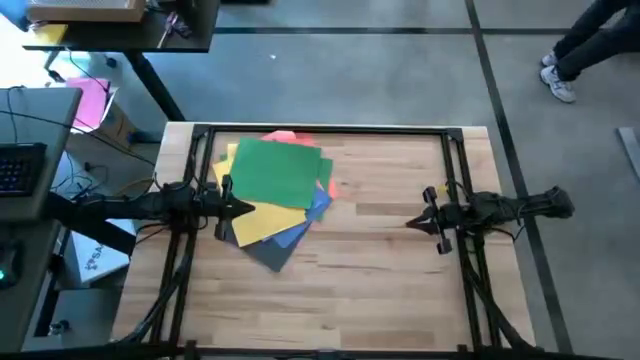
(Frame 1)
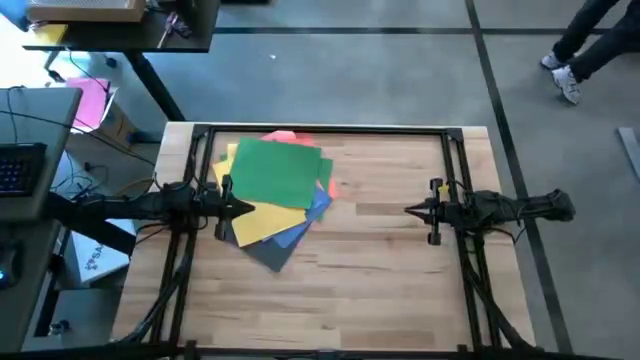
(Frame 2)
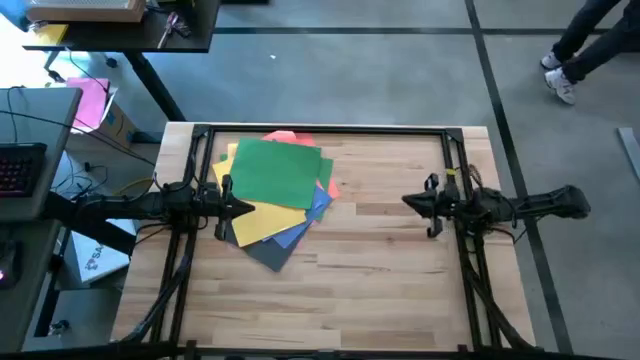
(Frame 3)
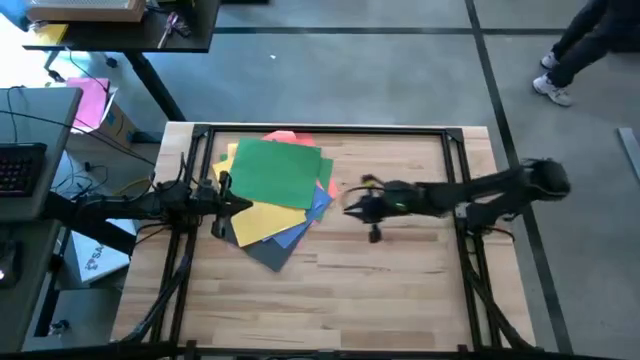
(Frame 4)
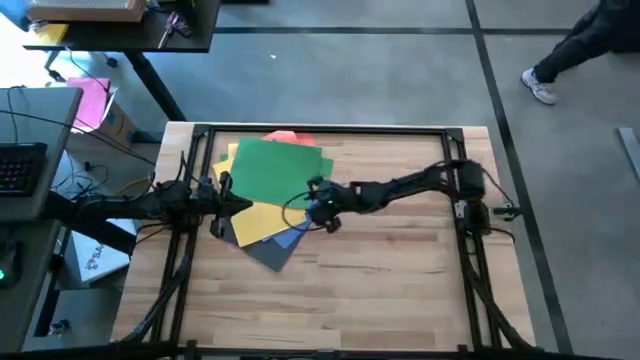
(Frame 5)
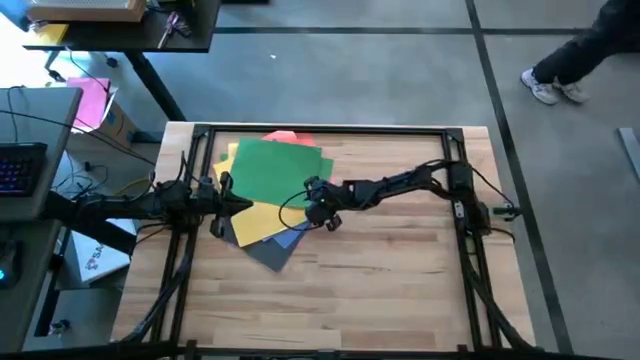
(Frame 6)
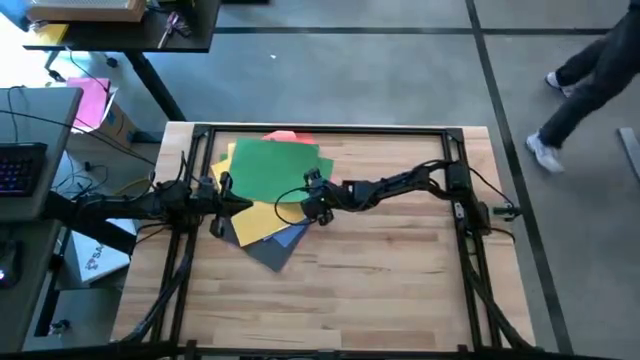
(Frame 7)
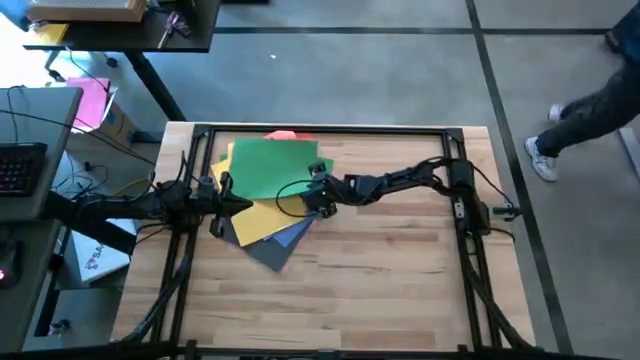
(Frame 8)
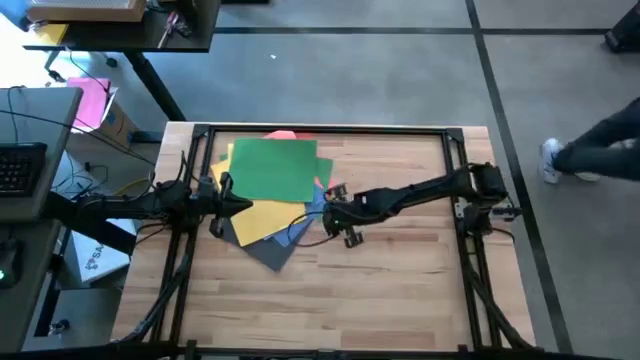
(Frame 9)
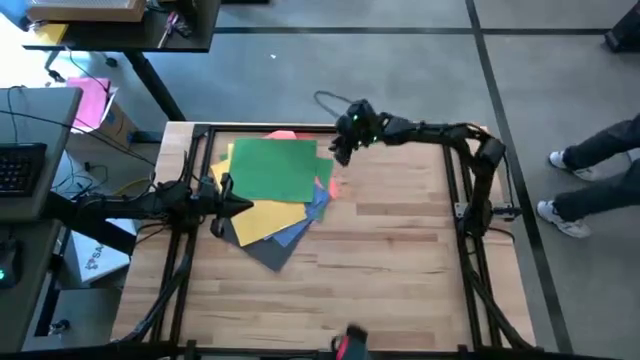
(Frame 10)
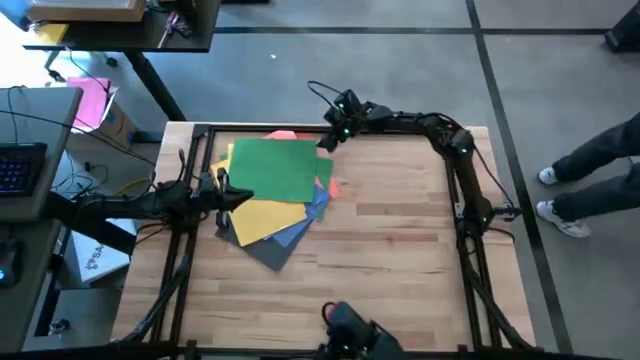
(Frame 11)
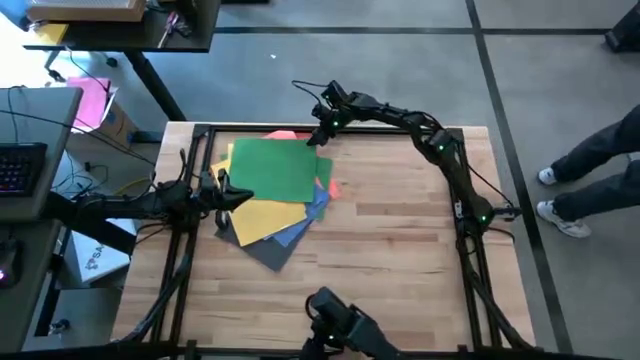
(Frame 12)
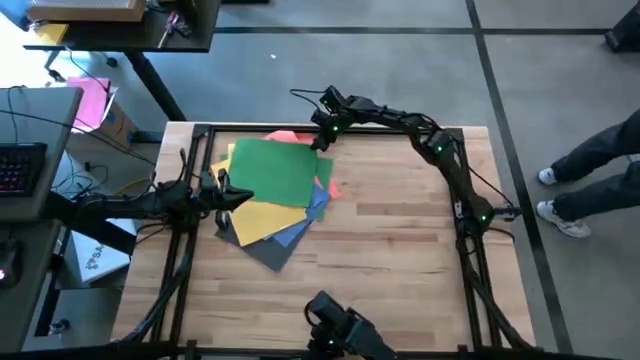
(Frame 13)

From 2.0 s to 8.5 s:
Task: Organize paper
Put the green paper to the bottom right

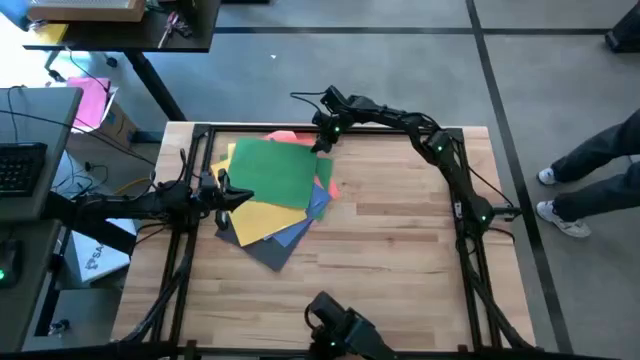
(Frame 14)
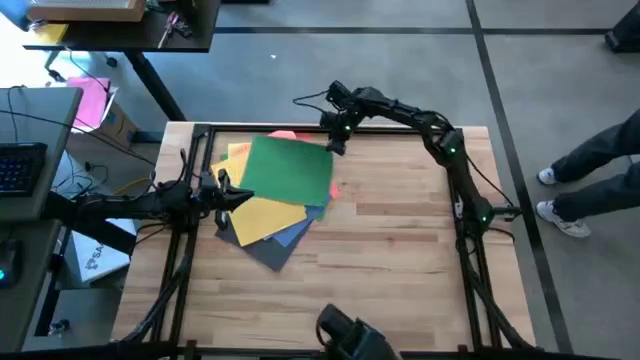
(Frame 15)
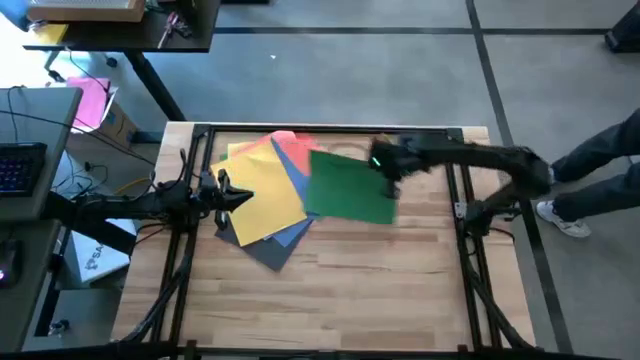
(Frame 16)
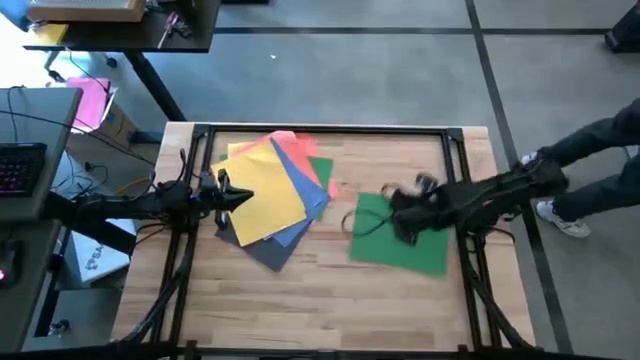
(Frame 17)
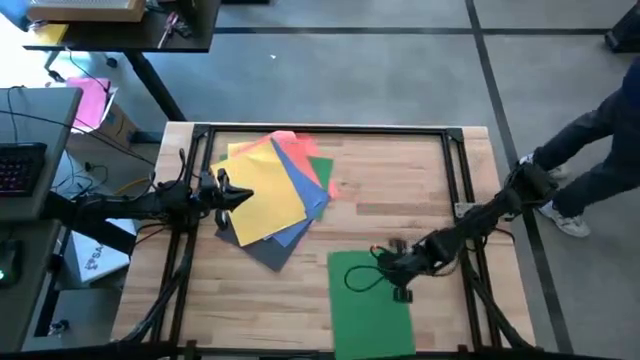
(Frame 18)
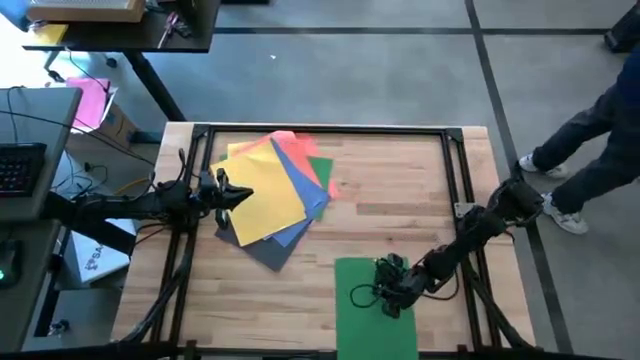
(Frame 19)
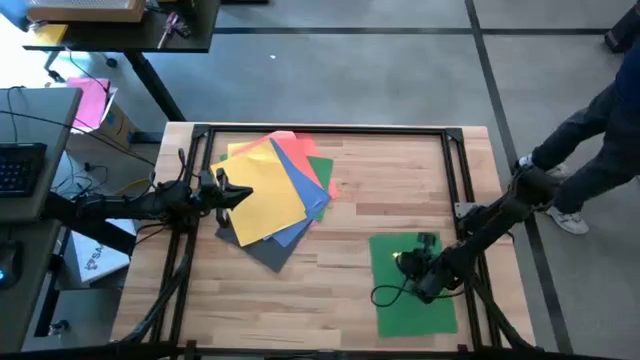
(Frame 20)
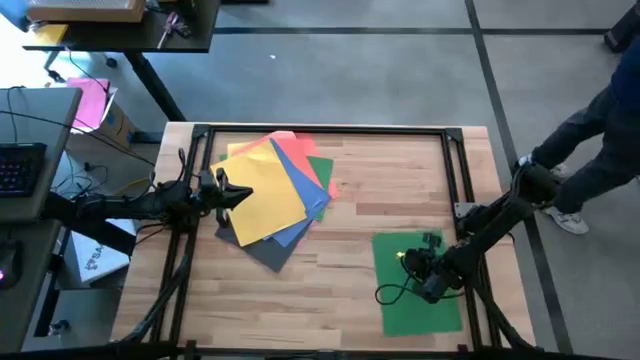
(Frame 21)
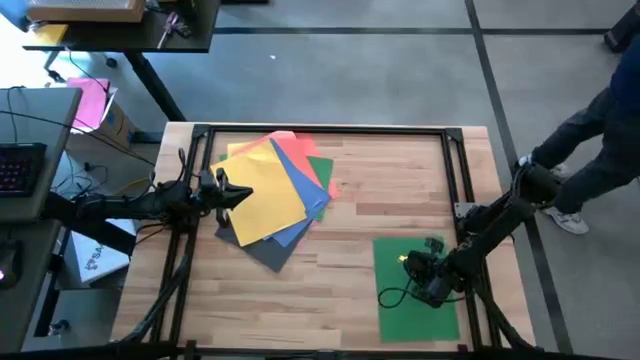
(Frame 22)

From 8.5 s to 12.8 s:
Put the green paper to the bottom right of the table

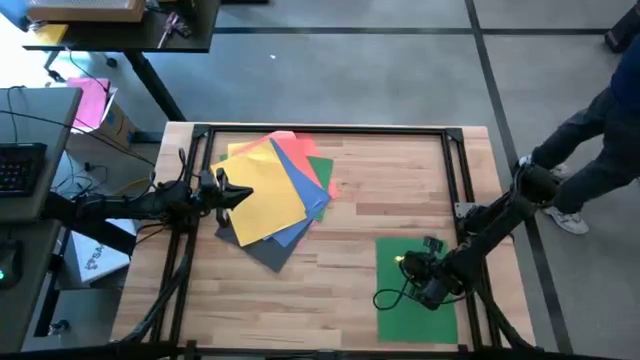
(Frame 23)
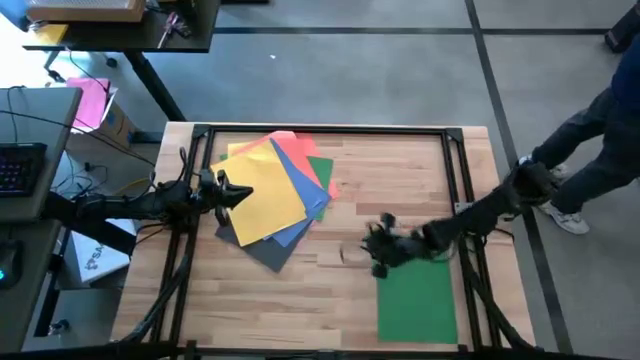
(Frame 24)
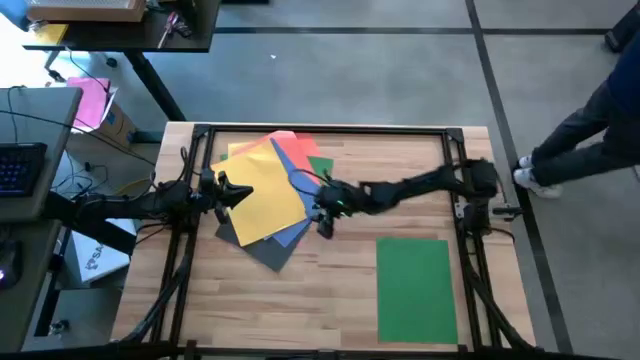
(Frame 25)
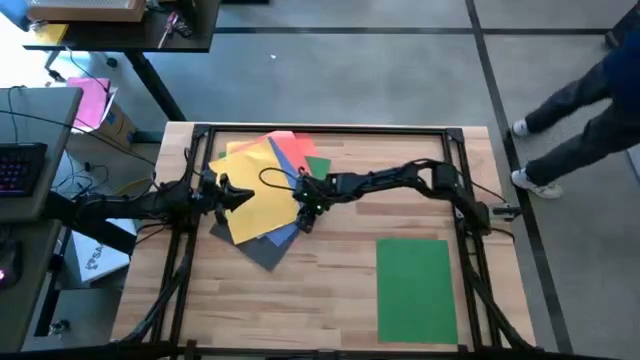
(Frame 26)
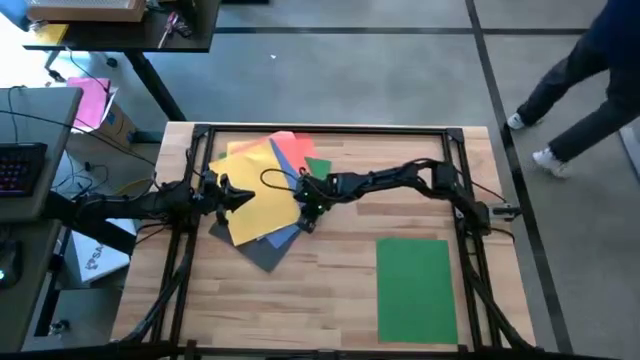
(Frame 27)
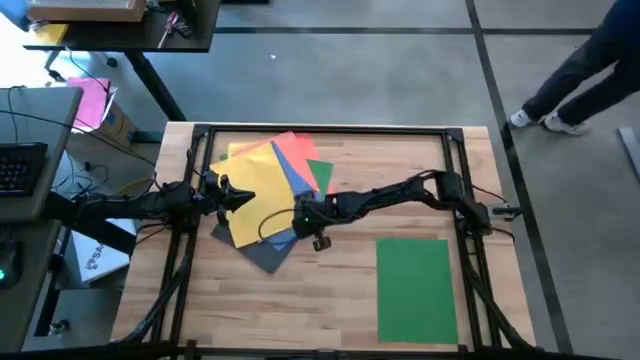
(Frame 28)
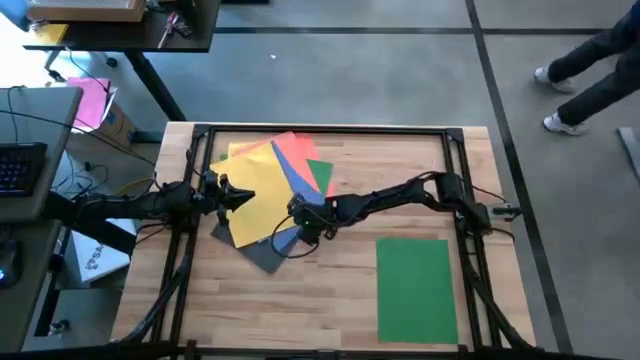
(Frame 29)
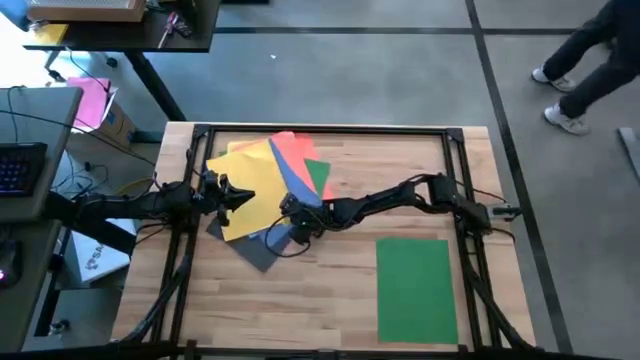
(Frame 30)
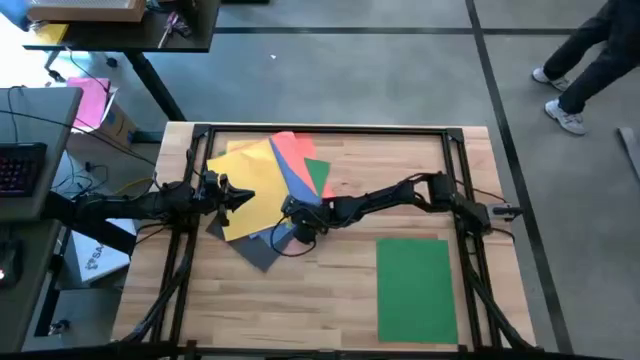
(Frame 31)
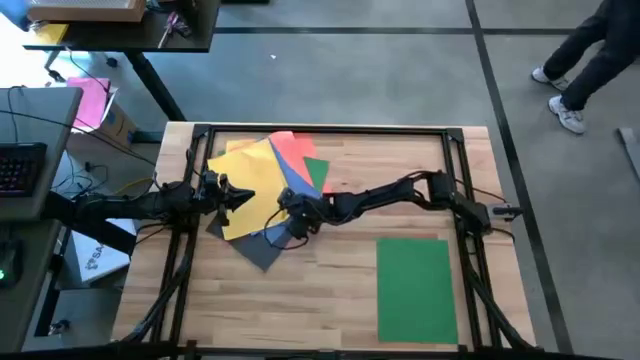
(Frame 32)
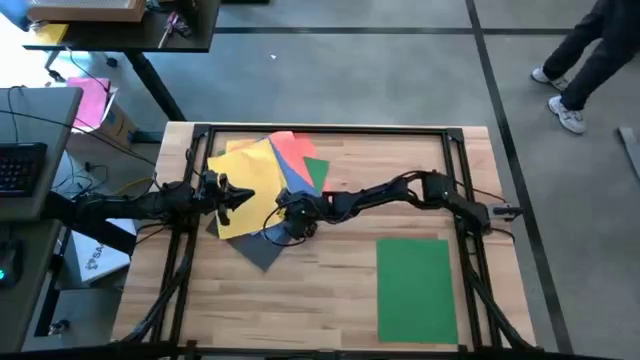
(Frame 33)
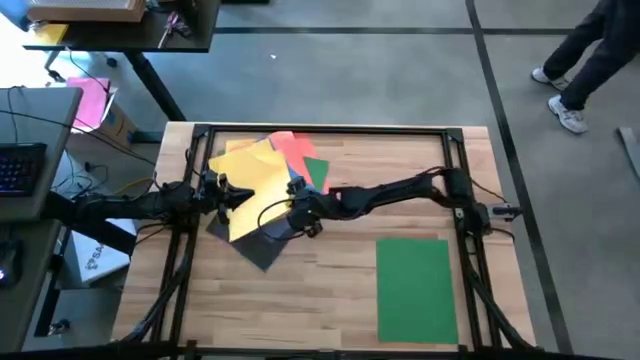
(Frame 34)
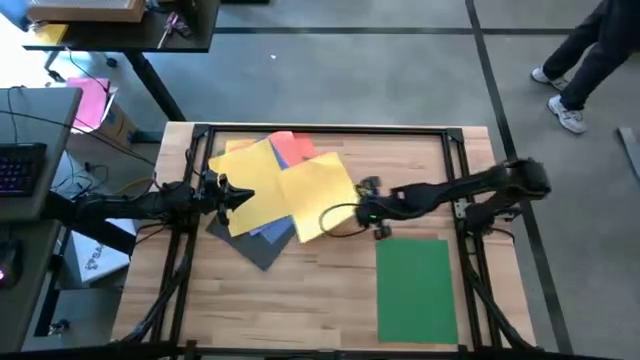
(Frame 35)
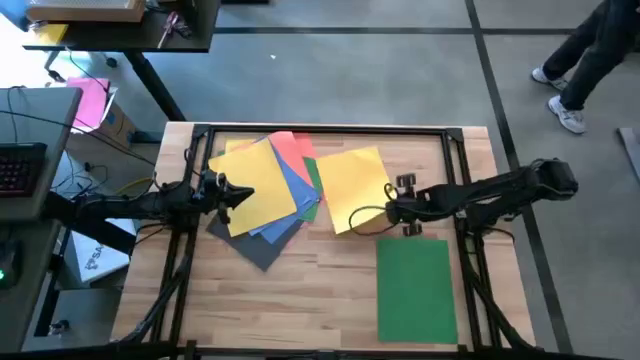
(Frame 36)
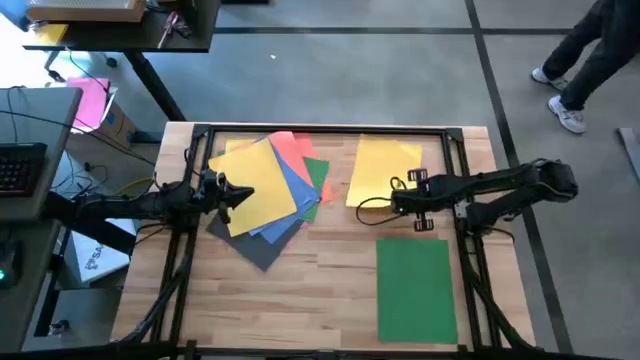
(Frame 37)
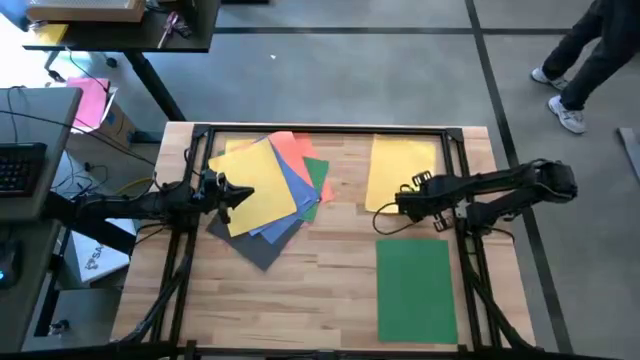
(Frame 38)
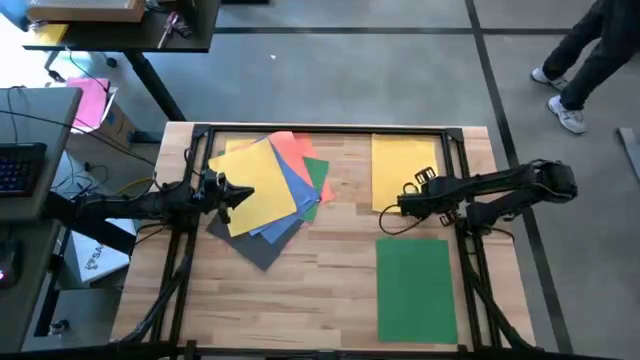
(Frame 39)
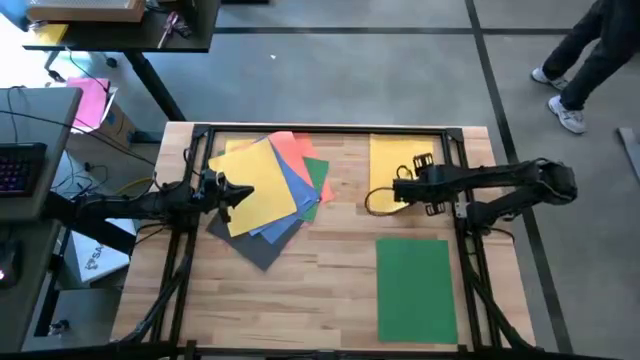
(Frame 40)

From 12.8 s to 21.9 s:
Put the yellow to the top right of the table

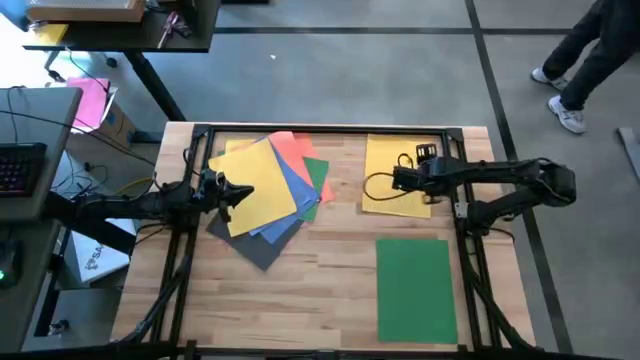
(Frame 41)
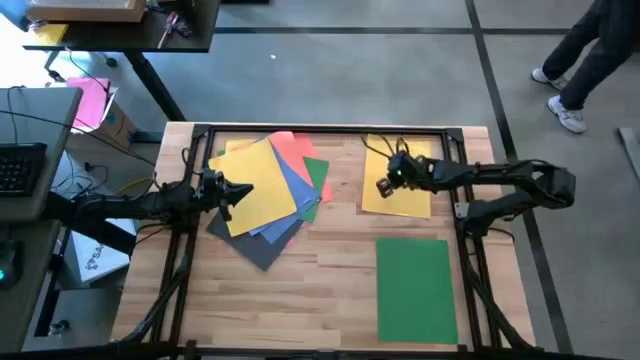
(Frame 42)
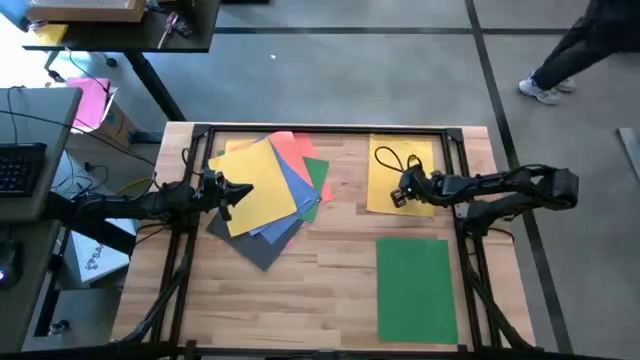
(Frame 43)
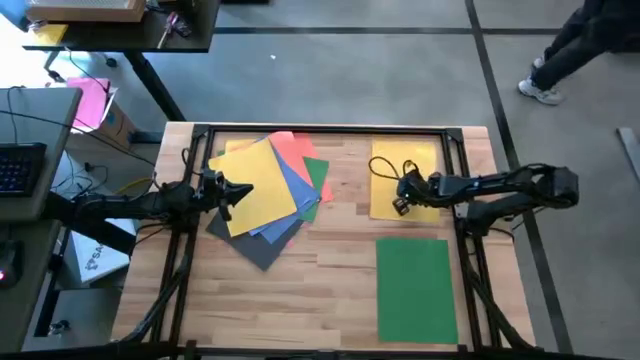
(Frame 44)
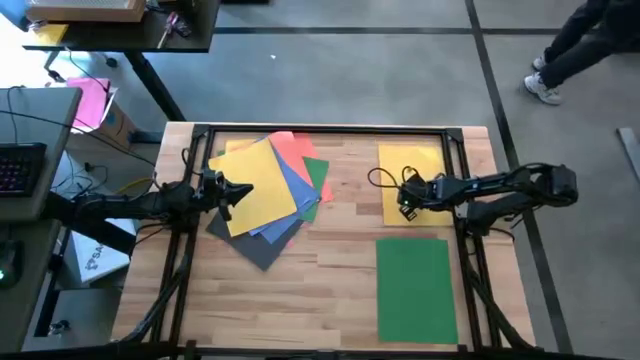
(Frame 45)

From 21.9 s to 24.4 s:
Adjust the top right yellow paper

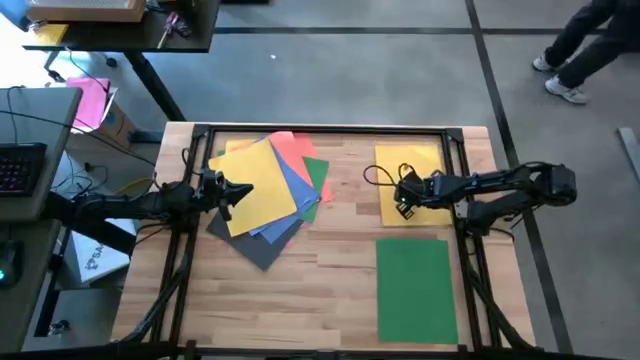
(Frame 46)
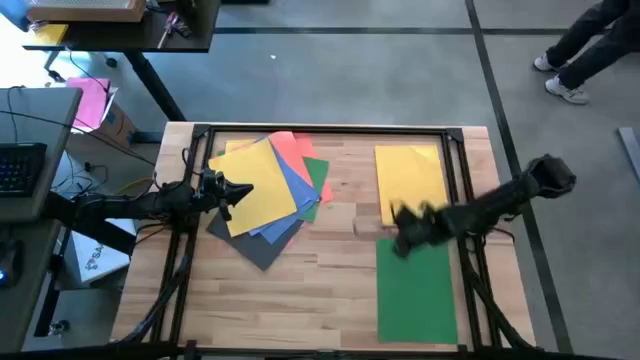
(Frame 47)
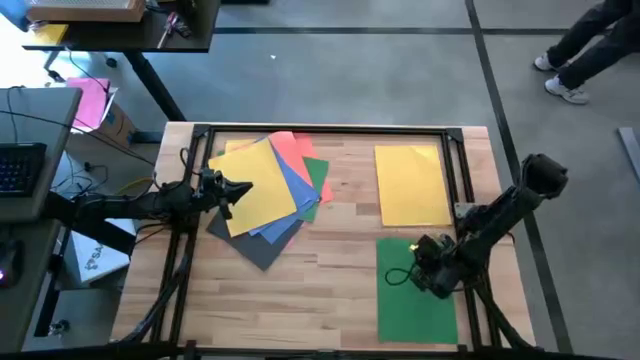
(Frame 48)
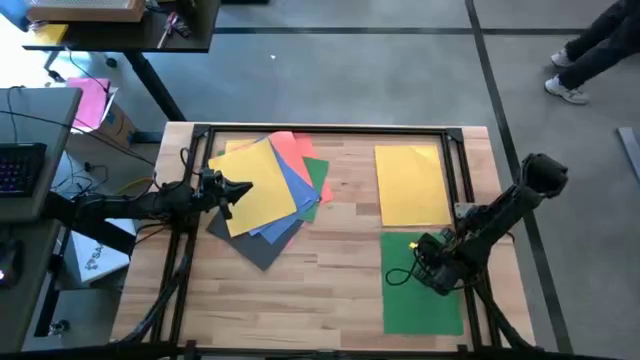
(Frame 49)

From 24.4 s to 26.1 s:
Adjust the bottom center green paper
